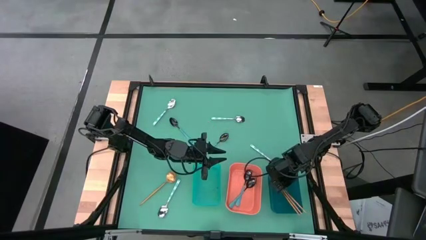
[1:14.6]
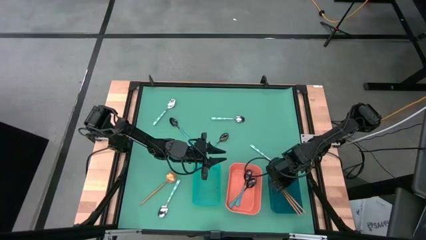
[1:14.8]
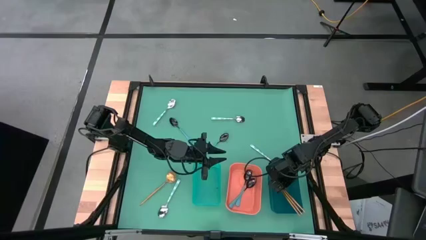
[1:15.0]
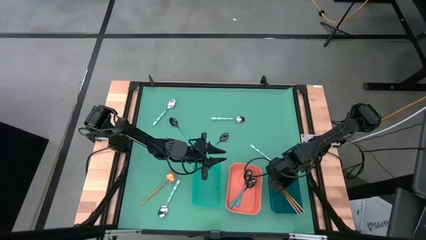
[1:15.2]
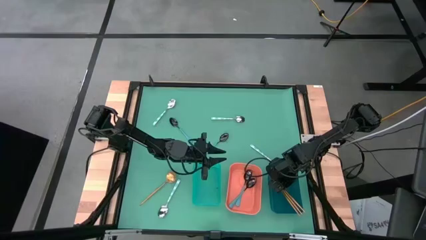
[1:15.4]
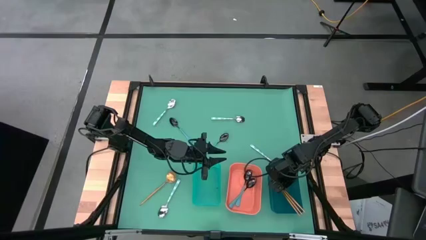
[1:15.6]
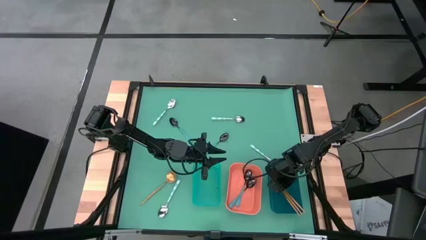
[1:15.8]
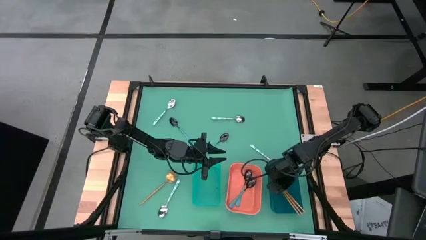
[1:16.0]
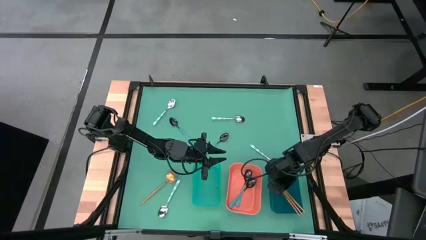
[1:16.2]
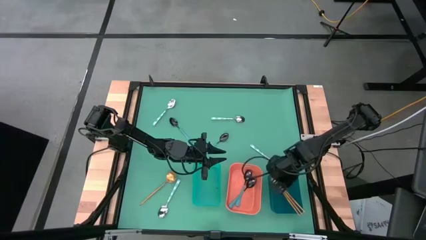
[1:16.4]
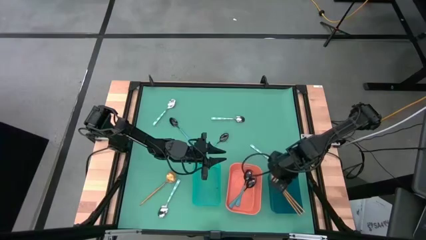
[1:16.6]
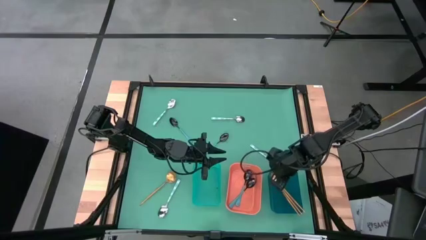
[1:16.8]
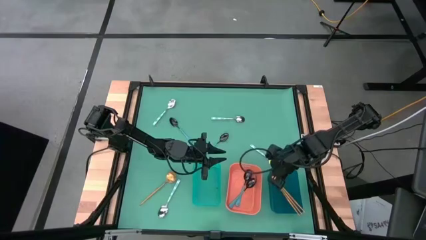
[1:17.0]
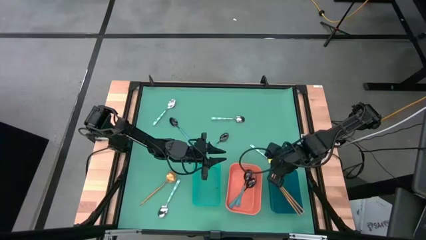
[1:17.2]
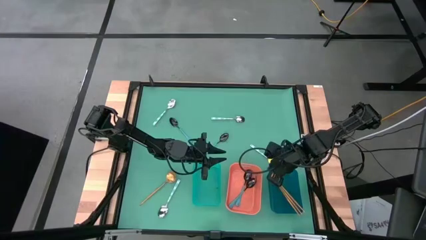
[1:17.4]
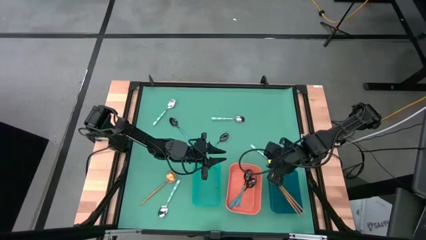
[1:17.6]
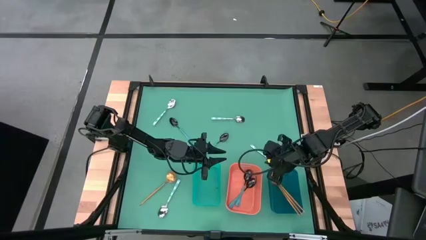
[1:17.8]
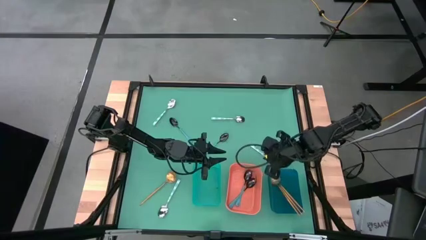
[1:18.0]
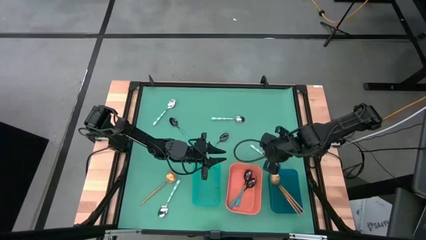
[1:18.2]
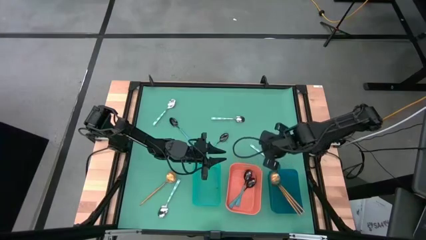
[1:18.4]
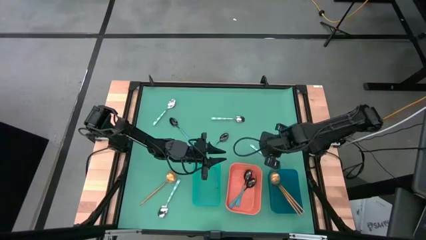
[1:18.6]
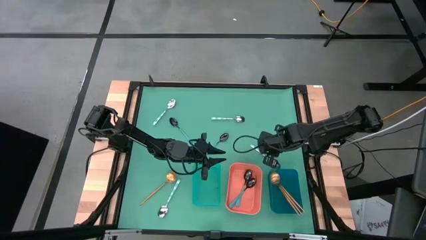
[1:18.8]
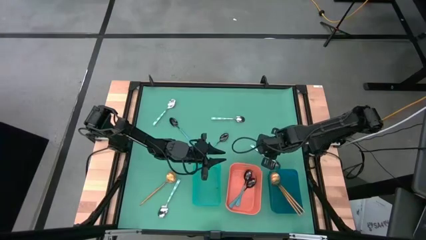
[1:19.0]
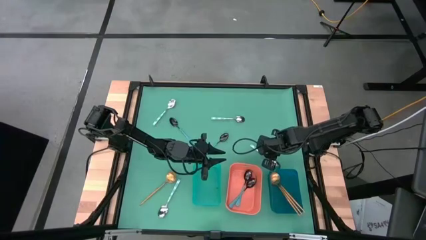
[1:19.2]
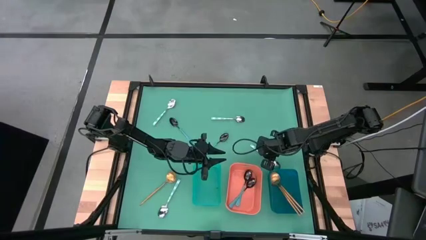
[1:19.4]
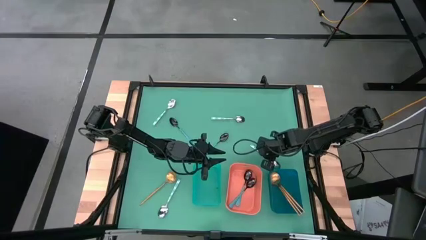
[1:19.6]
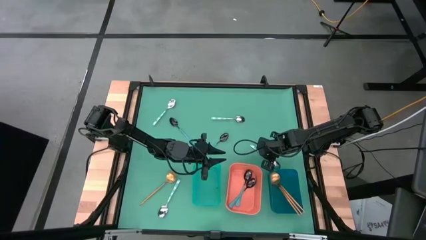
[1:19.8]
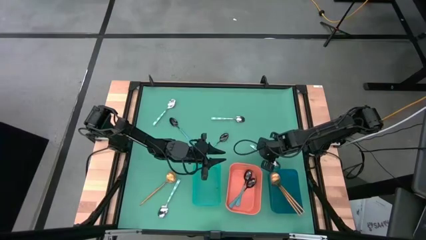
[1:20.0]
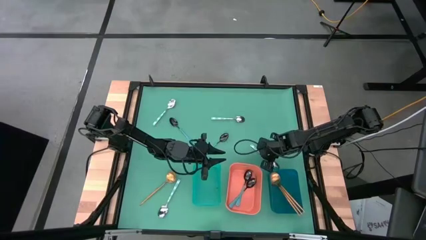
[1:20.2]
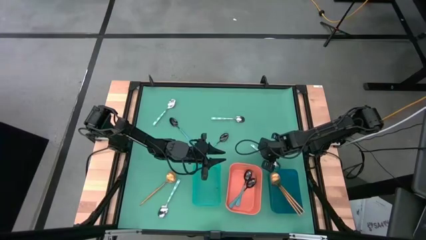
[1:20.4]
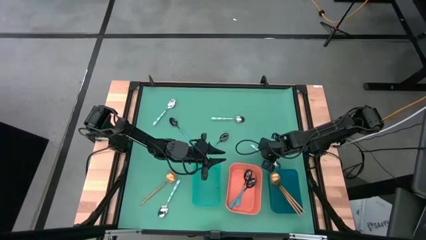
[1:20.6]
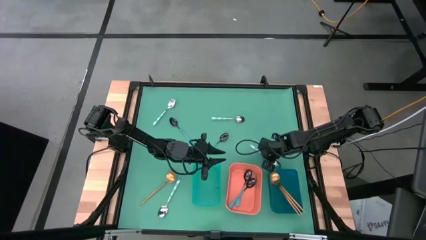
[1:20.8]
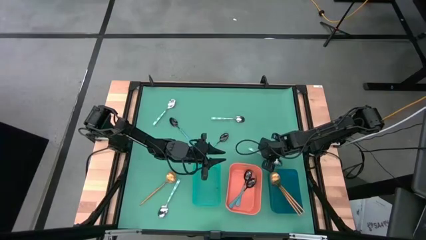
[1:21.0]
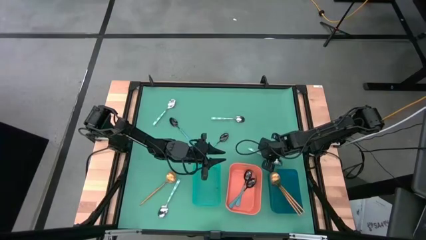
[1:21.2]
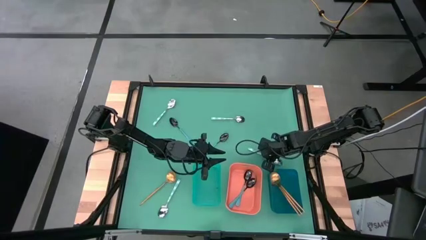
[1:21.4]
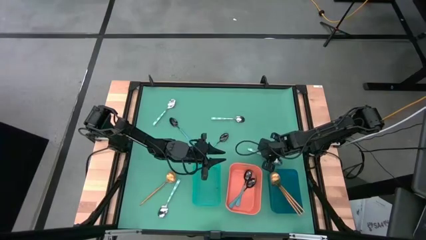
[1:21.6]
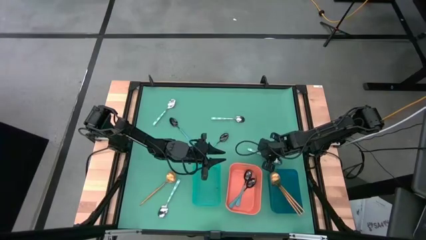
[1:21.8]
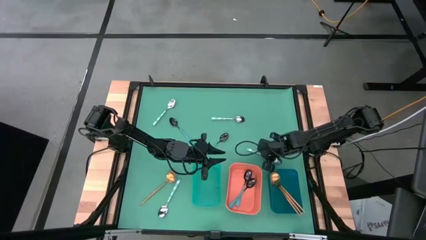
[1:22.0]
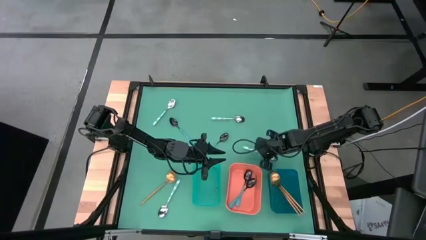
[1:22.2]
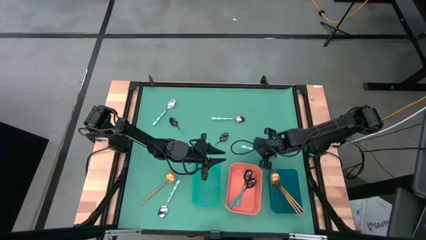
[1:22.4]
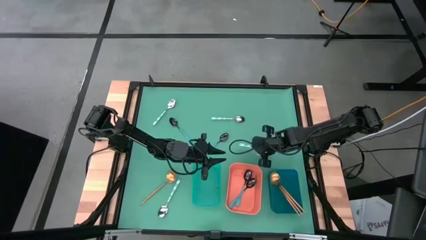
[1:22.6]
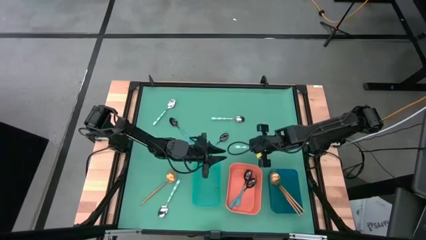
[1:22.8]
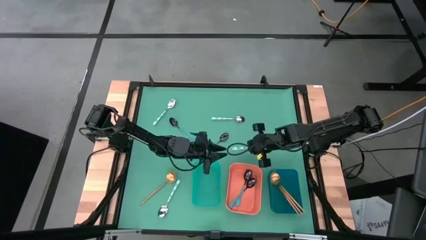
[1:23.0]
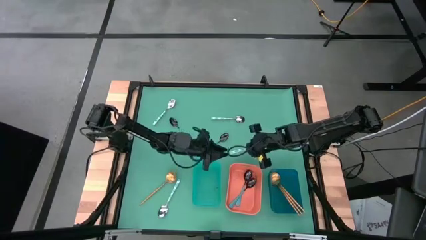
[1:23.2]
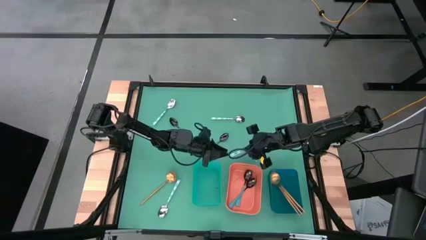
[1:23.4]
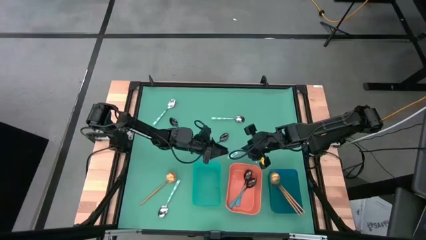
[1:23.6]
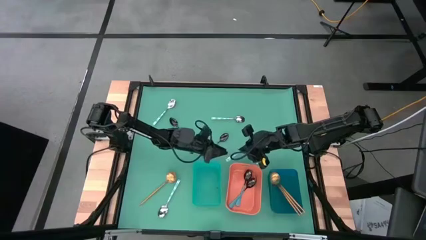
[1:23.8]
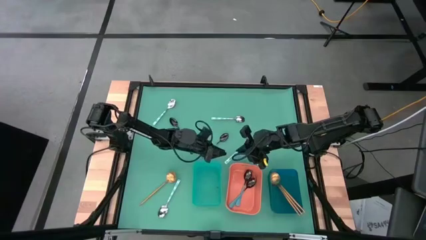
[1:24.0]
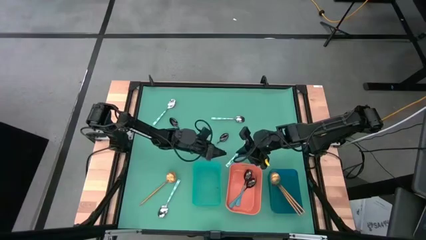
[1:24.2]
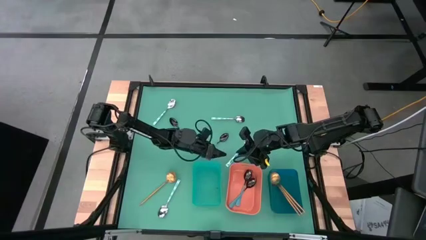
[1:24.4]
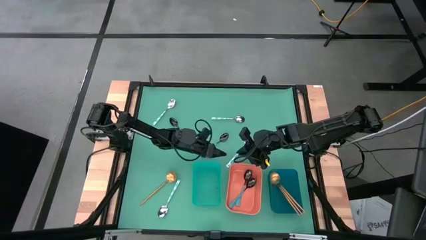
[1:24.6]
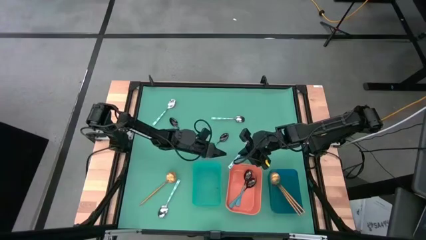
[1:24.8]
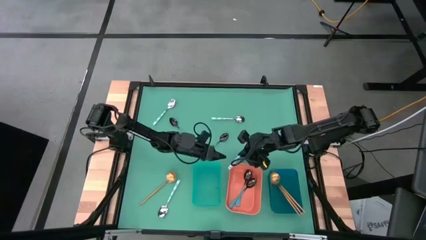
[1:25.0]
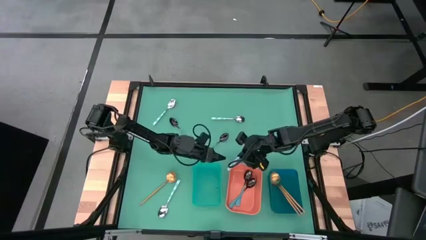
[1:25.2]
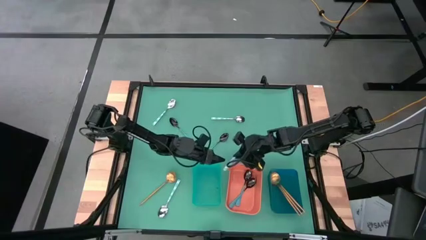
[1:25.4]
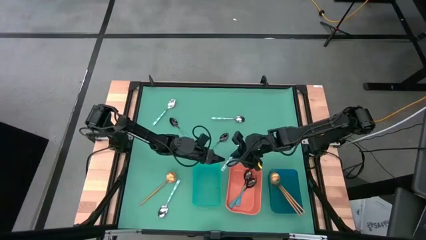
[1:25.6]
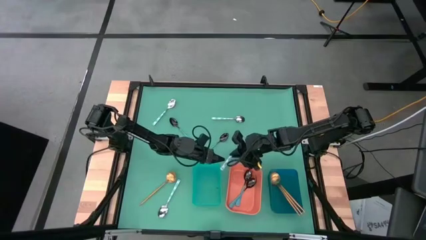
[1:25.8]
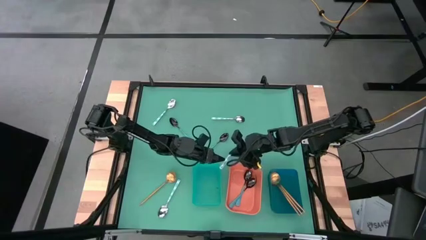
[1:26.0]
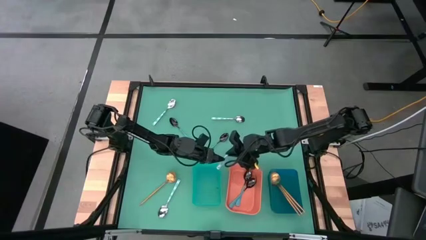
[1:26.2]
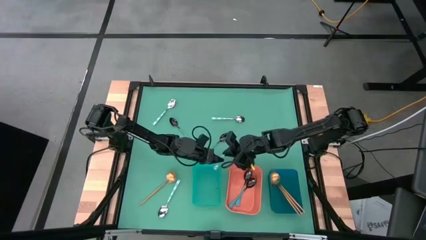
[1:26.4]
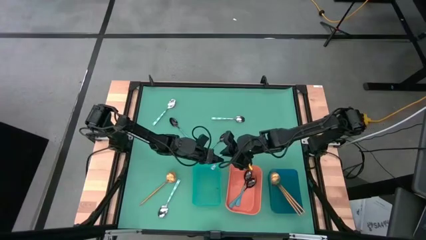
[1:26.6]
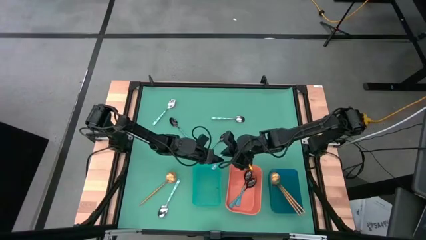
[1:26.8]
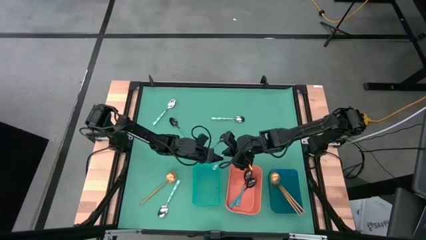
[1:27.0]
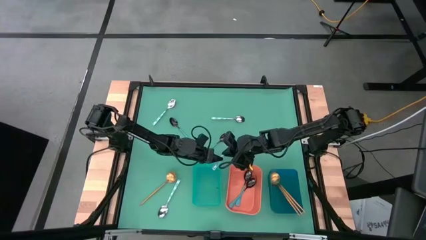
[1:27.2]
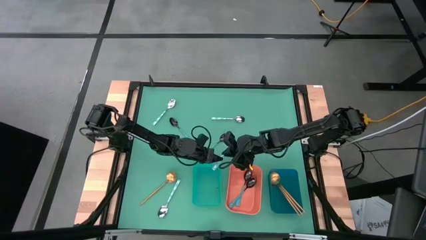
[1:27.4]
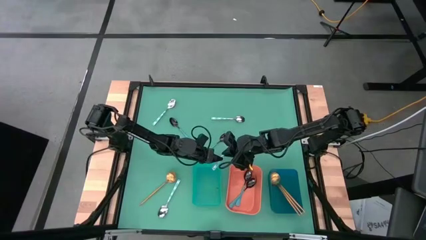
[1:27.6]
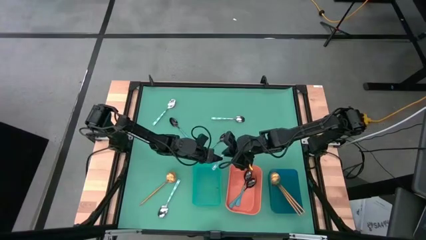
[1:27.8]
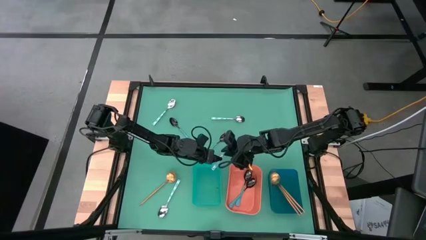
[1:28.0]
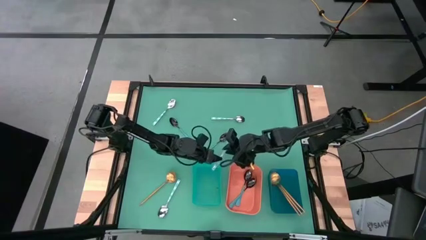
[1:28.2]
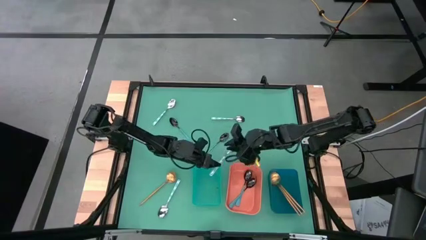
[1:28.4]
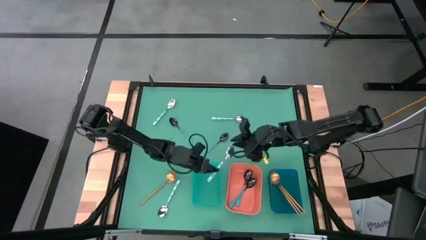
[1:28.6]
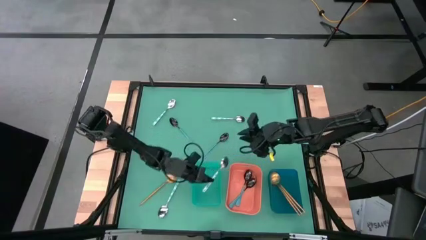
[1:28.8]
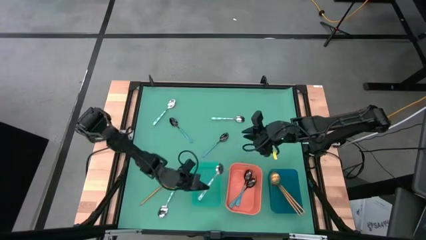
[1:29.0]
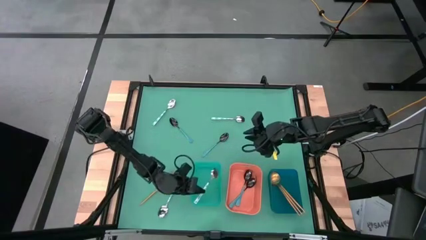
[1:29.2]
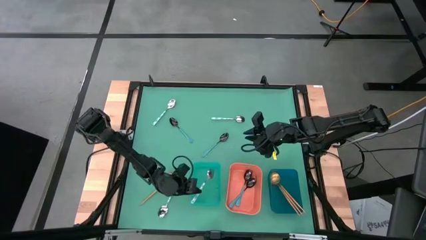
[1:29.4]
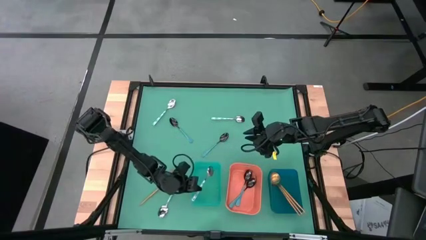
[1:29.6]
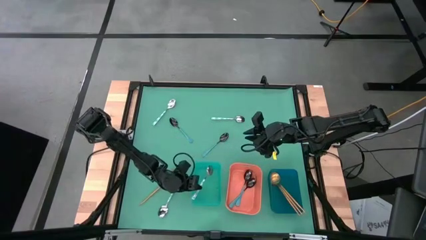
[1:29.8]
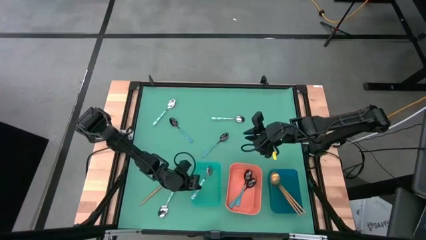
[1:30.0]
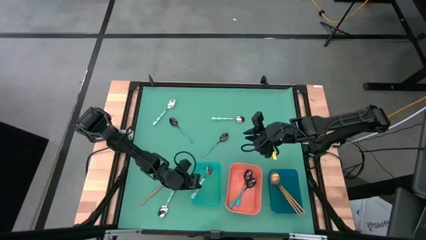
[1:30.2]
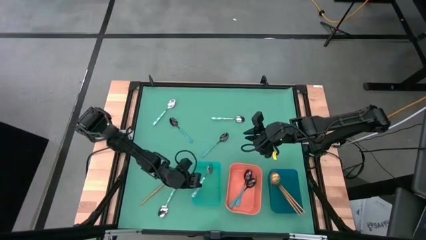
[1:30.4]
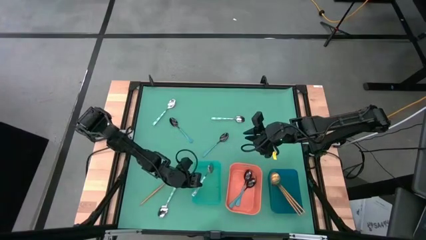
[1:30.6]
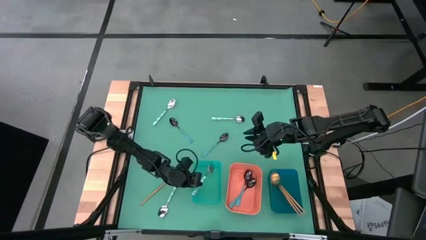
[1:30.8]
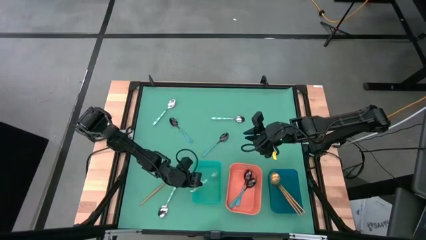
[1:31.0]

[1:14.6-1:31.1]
Task: Sort silverware by color (type)
Put the light blue spoon into the light blue bin
